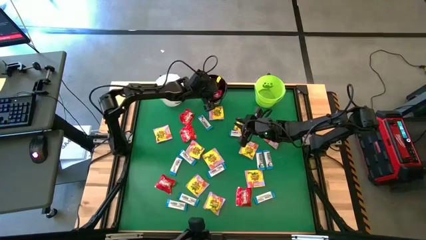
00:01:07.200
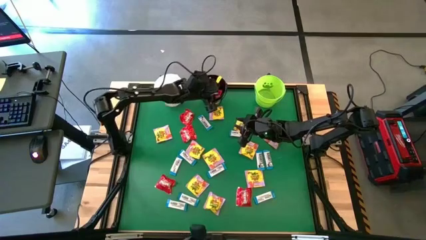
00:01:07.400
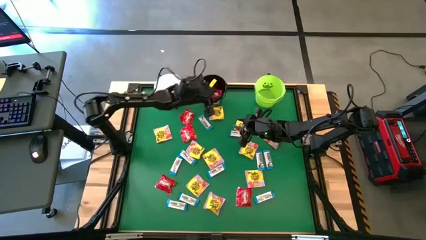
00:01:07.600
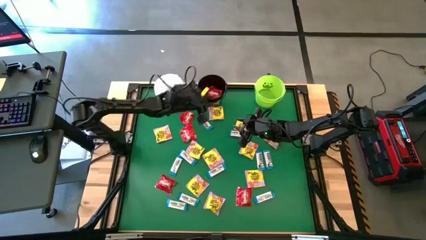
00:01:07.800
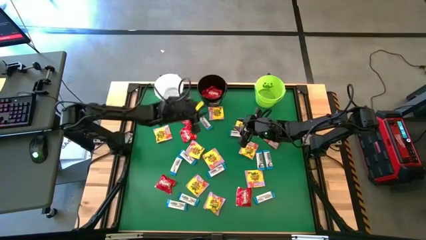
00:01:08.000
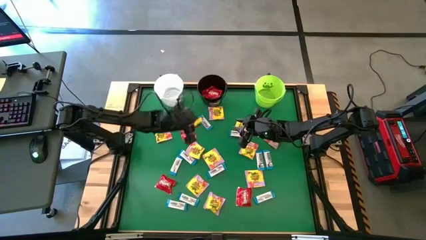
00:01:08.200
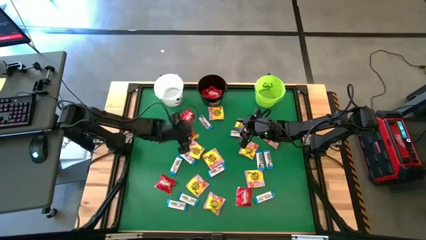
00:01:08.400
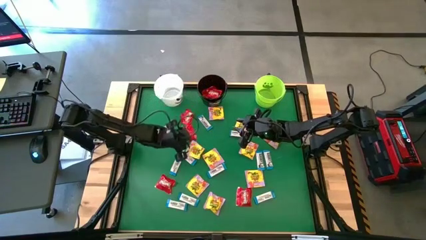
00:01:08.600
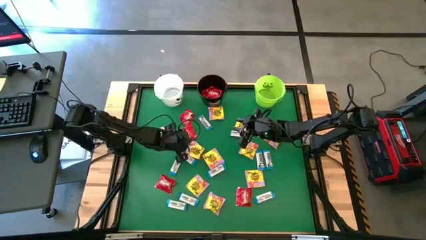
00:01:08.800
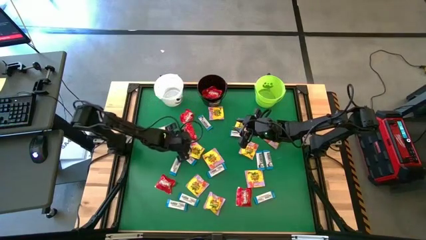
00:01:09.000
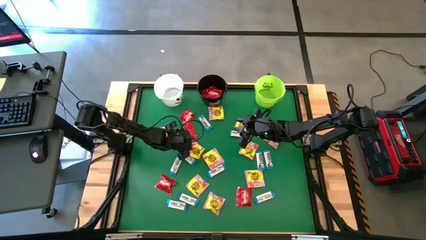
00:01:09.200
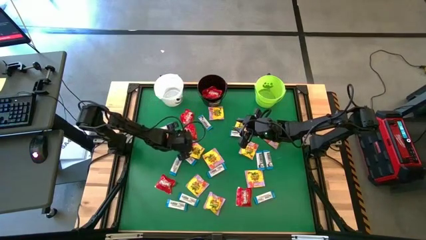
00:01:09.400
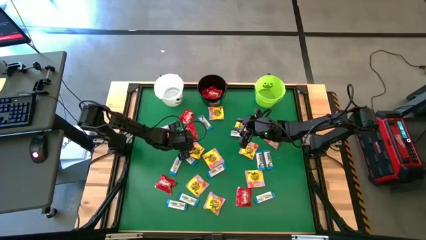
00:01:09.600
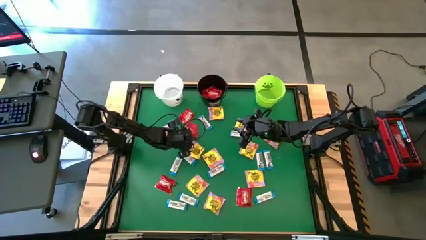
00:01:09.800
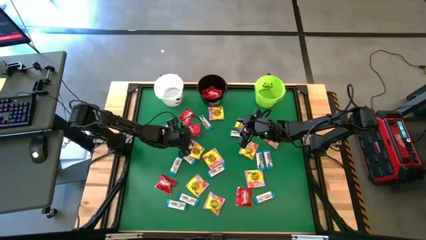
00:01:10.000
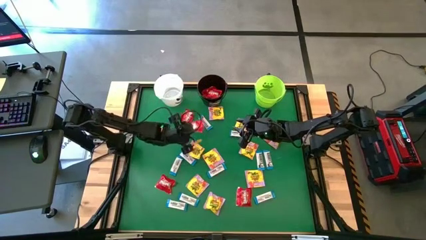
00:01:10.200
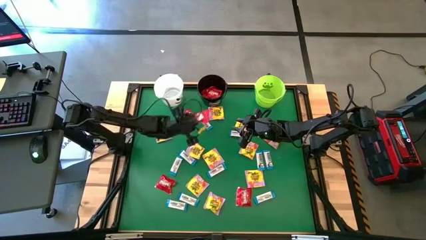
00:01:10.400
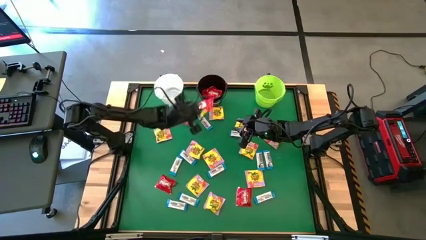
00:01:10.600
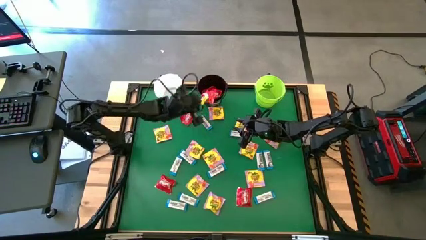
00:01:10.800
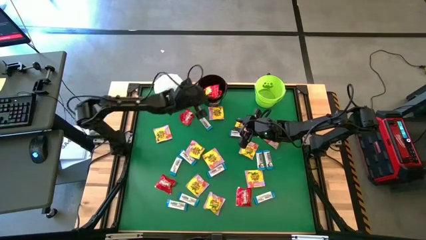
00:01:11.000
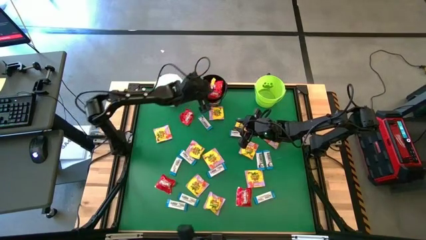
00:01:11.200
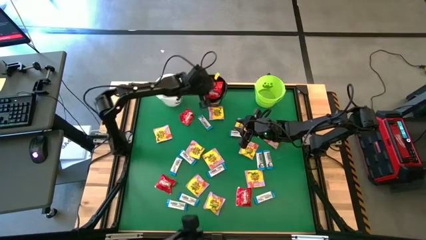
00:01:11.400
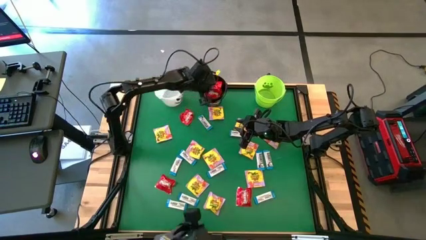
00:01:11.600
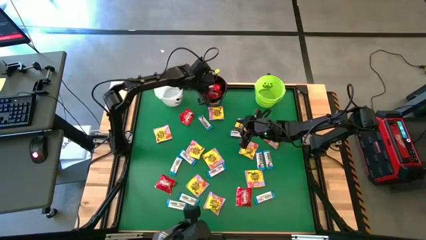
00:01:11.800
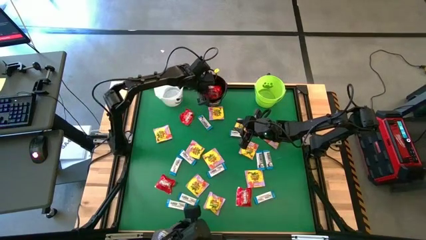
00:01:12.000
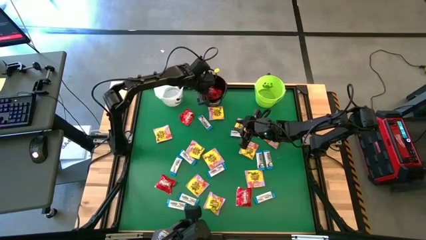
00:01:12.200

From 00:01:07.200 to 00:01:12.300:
Task: Sort candy by brand, put in halloween buckets
Put the red candy into the black bucket

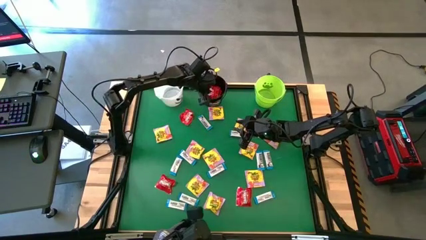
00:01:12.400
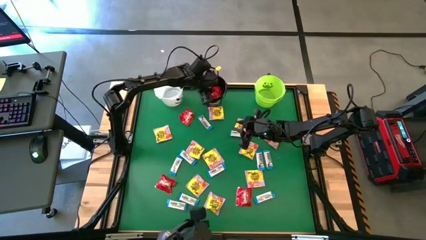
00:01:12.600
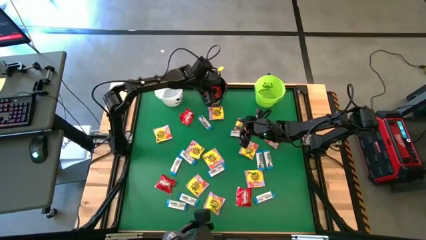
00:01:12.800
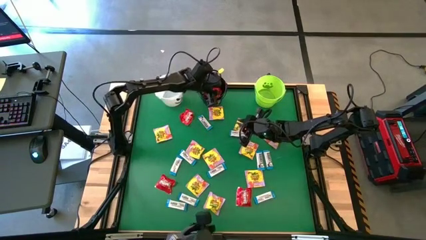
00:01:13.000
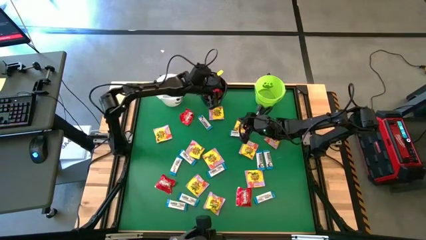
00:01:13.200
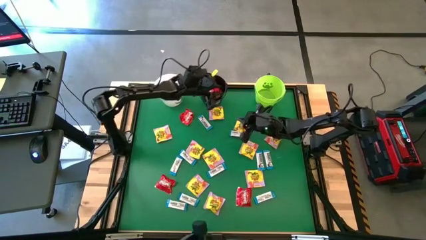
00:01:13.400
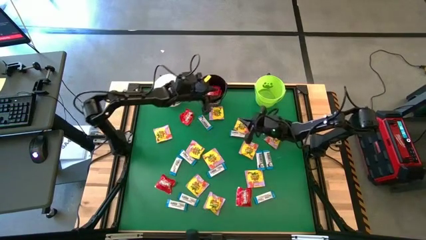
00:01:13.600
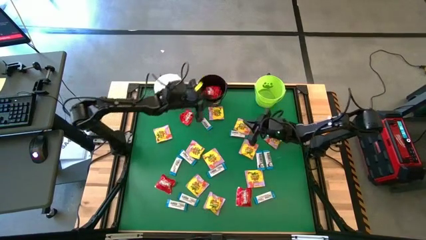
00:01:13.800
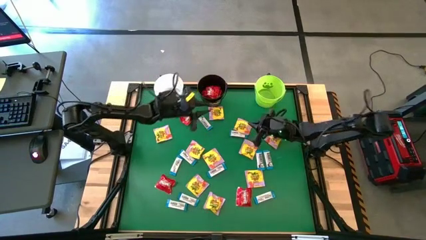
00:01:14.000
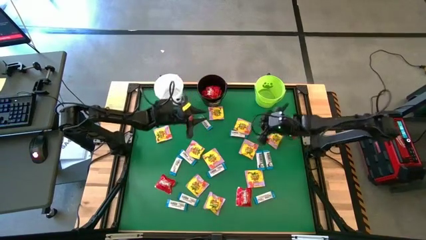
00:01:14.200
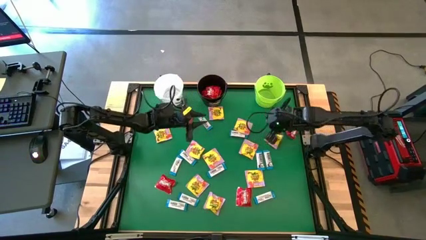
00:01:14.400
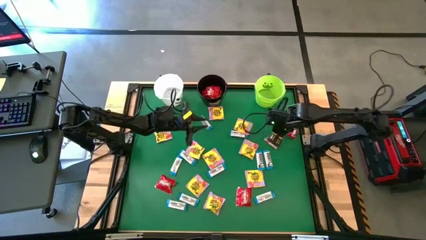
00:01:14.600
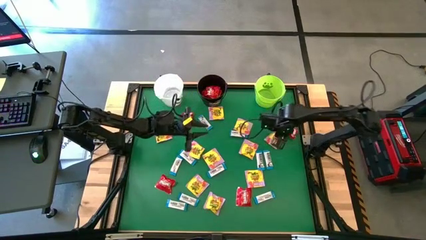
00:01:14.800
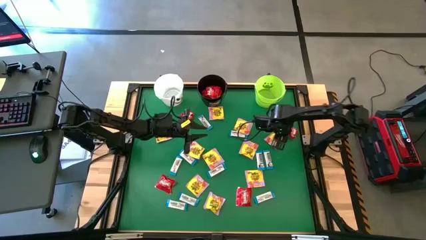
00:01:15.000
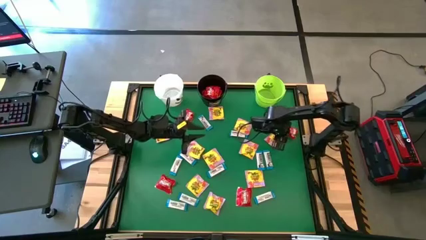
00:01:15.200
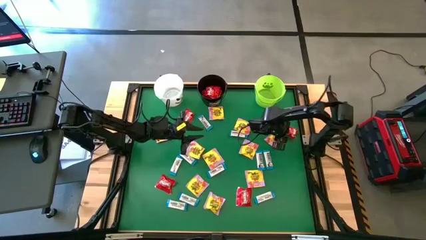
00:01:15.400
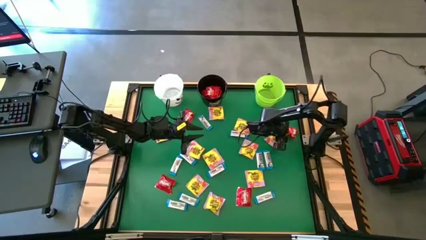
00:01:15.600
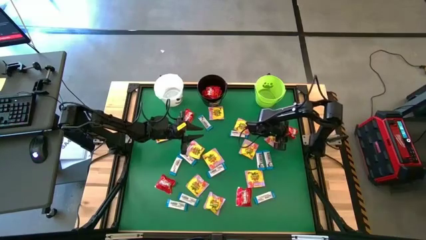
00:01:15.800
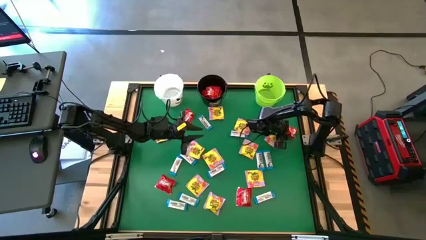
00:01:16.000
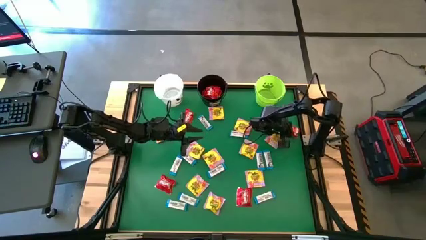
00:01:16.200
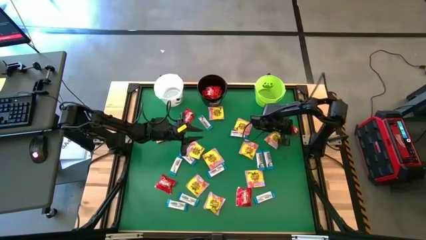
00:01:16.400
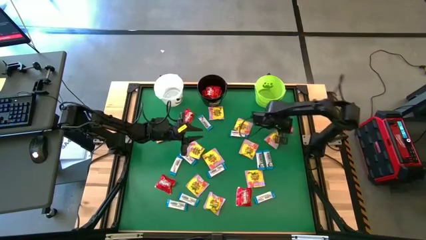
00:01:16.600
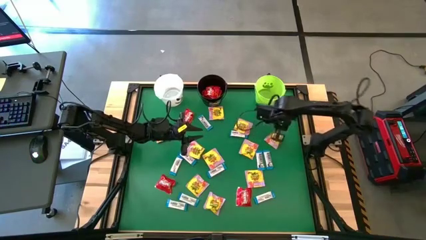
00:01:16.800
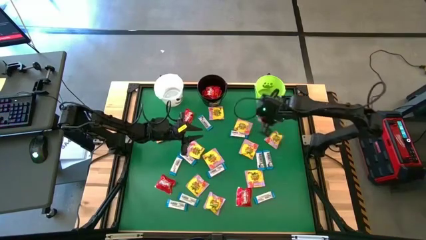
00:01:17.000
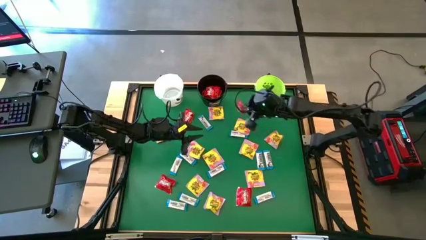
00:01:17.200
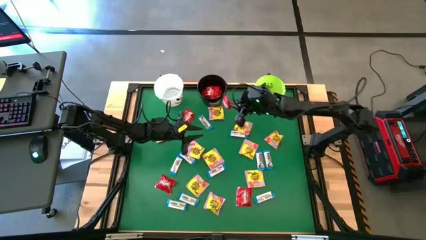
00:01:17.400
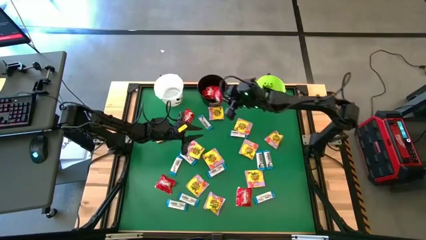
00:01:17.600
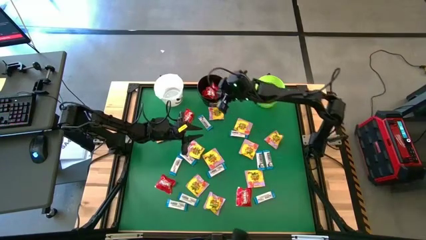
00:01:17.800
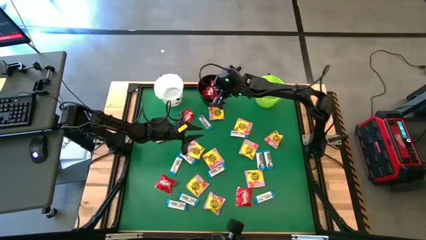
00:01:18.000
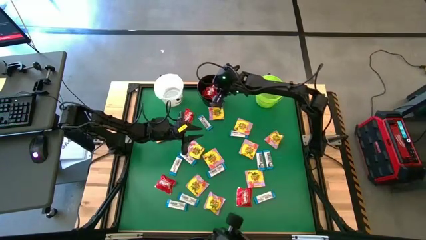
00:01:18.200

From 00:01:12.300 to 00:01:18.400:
Put the red candy into the black bucket

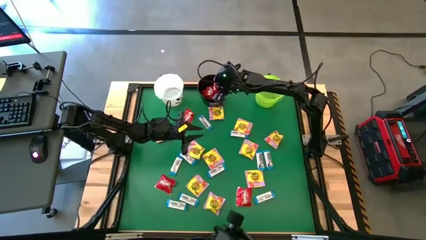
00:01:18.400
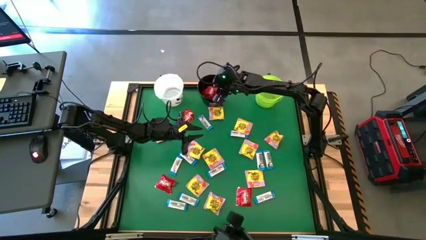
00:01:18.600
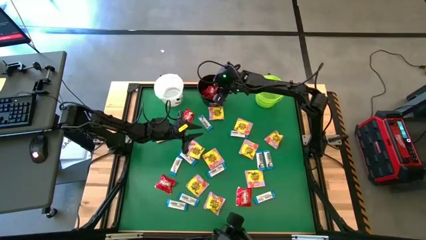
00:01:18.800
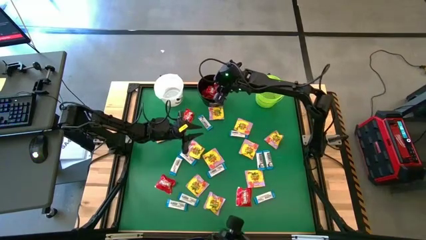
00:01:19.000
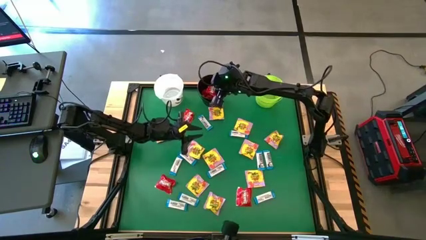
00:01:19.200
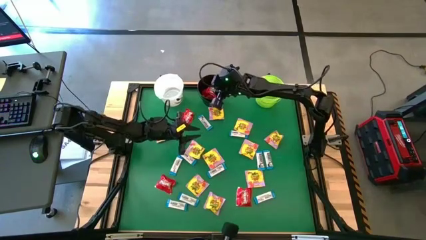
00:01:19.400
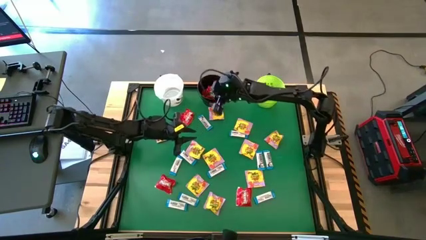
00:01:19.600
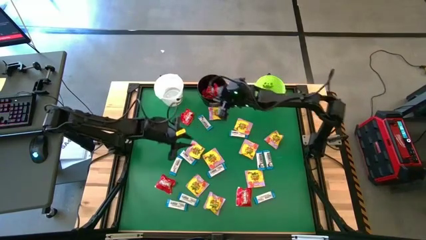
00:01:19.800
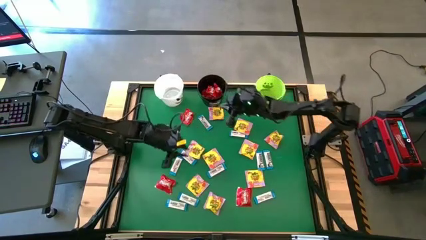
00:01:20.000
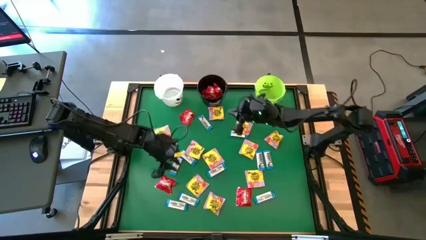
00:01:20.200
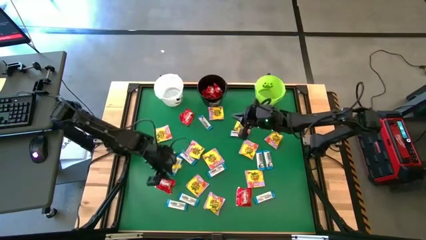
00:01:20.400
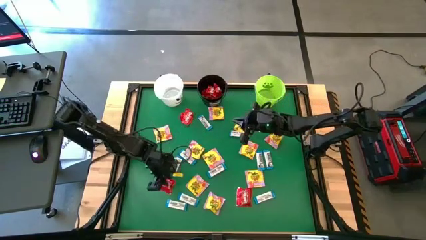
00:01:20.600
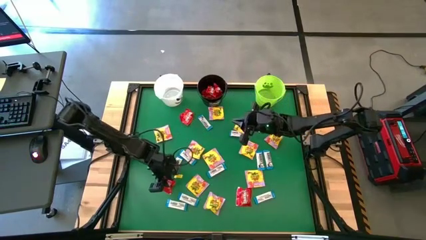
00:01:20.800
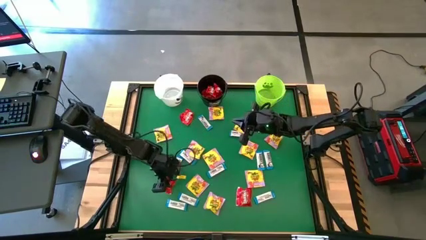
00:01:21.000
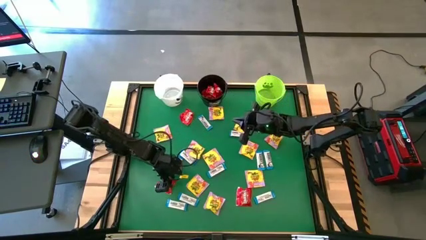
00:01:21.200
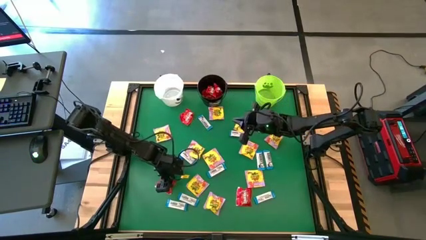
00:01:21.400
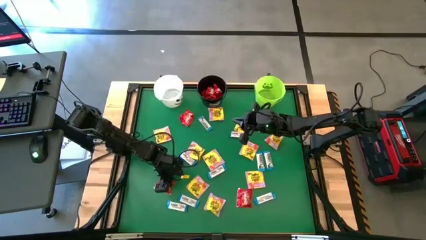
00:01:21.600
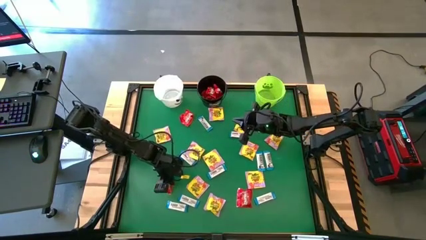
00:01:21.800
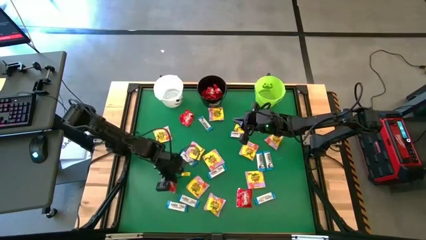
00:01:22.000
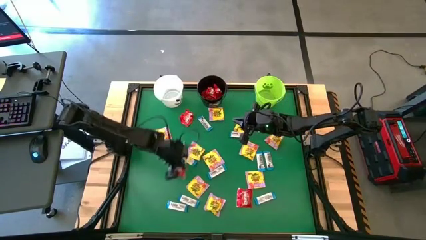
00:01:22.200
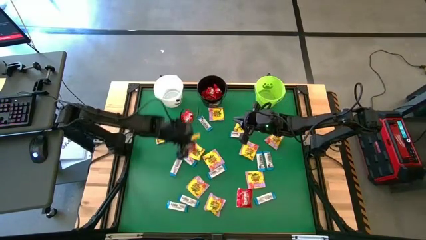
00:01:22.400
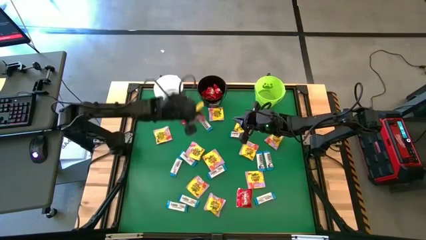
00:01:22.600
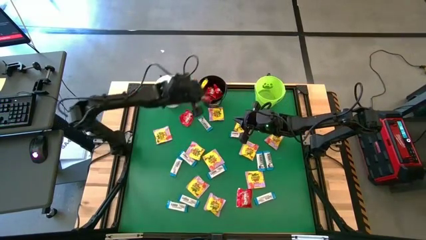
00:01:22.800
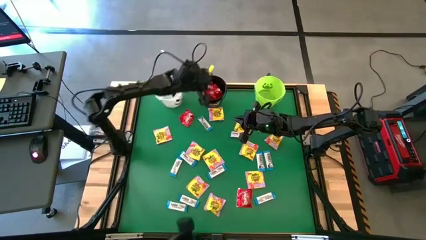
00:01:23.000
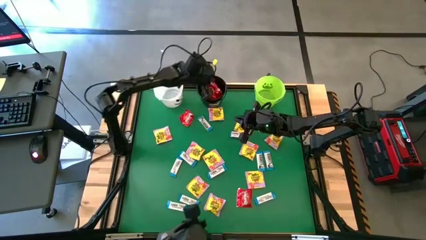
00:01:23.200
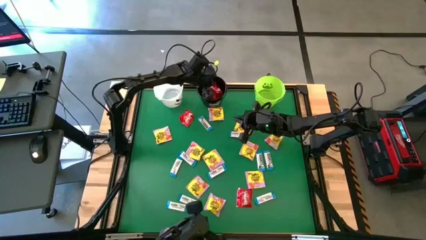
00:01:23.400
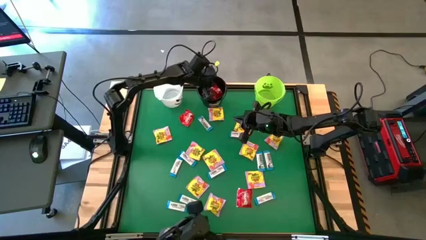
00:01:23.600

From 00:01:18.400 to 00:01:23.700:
Put the red candy into the black bucket
